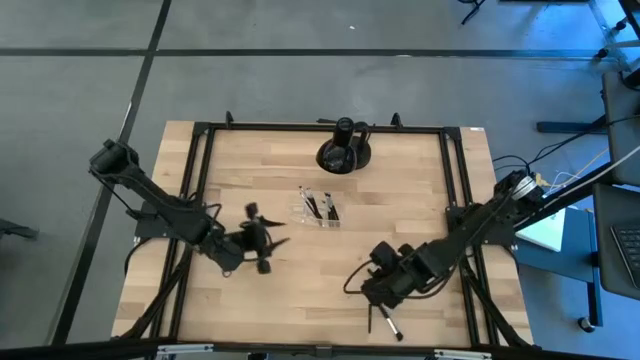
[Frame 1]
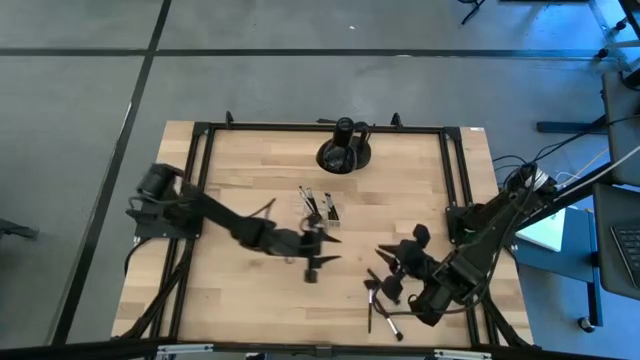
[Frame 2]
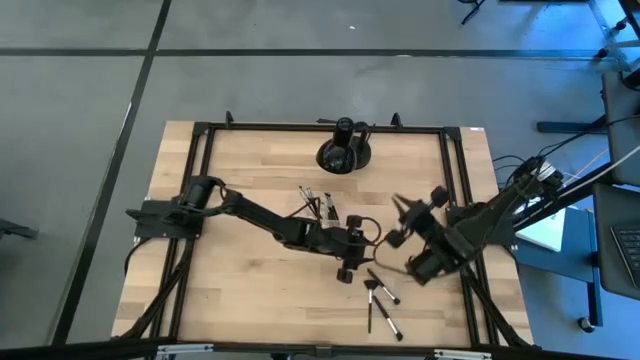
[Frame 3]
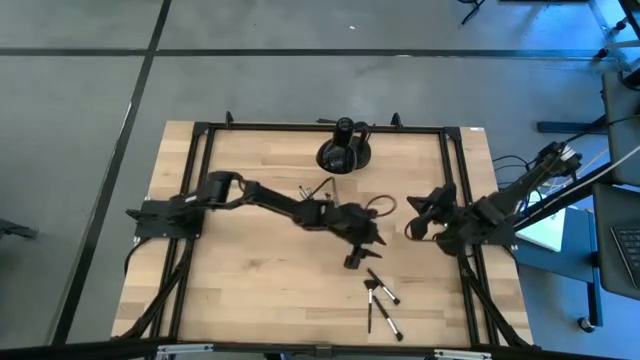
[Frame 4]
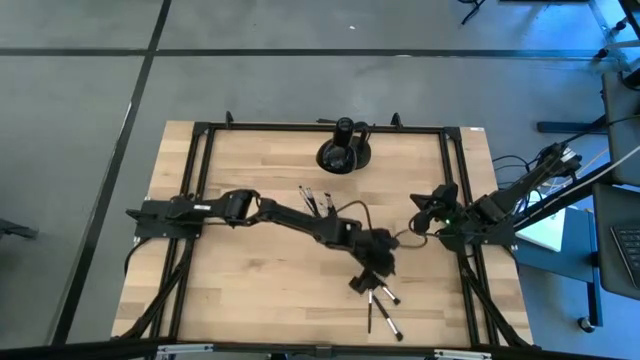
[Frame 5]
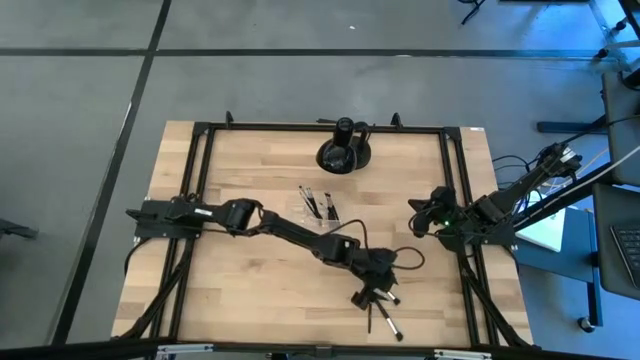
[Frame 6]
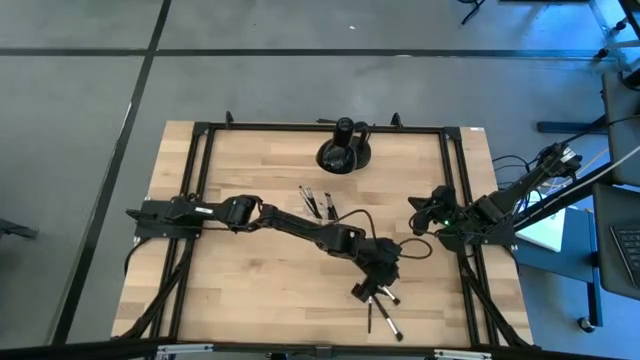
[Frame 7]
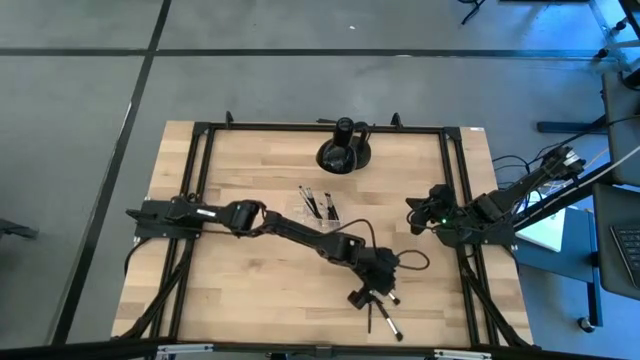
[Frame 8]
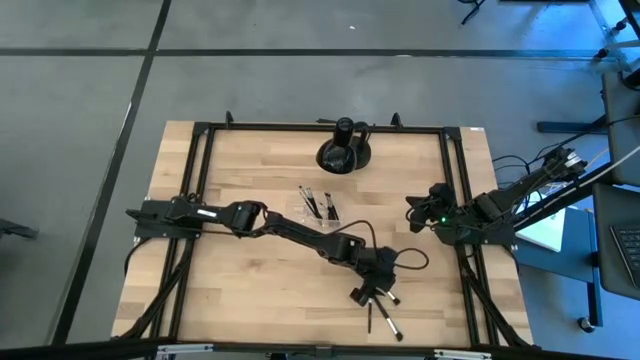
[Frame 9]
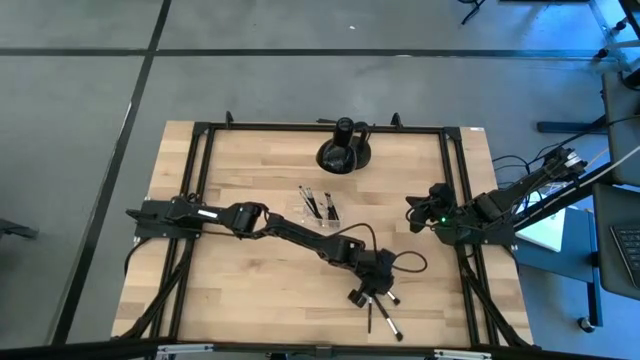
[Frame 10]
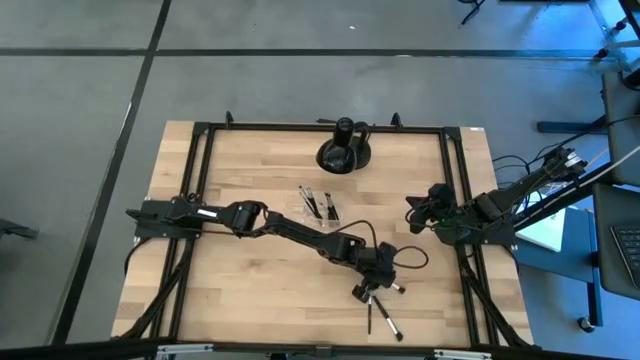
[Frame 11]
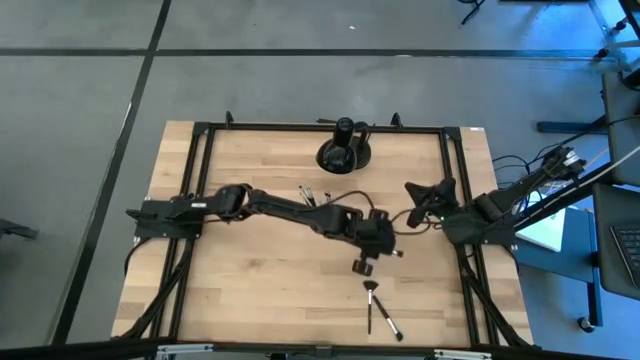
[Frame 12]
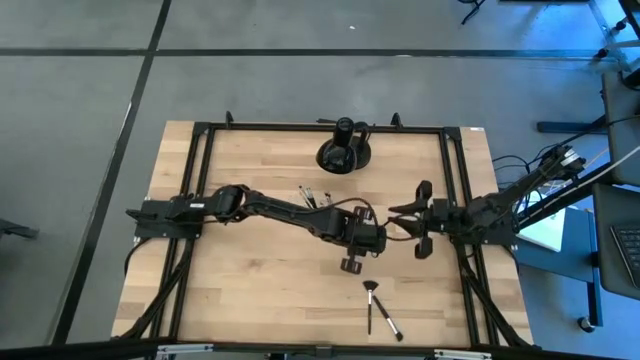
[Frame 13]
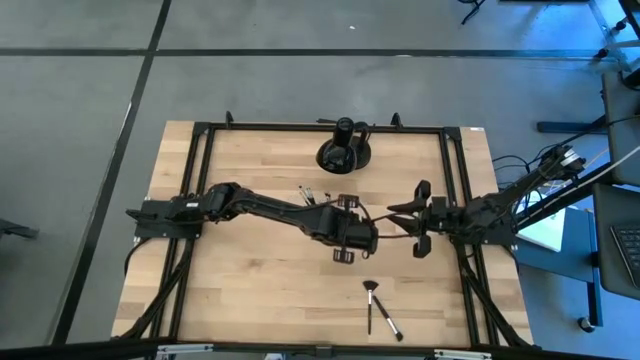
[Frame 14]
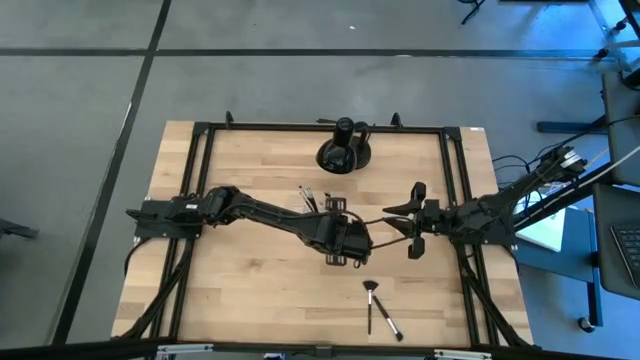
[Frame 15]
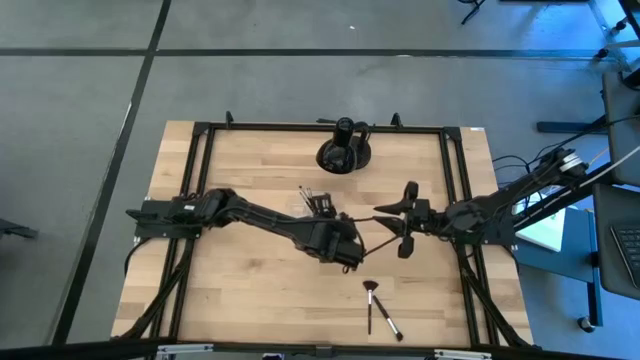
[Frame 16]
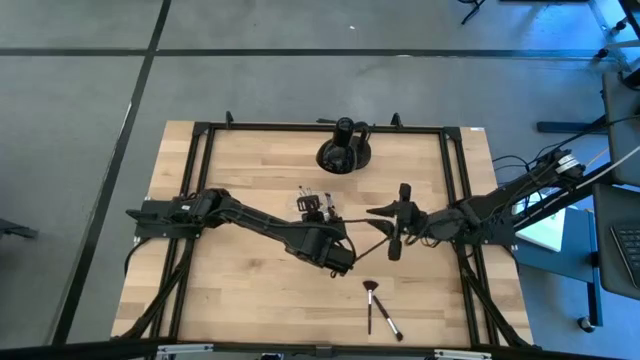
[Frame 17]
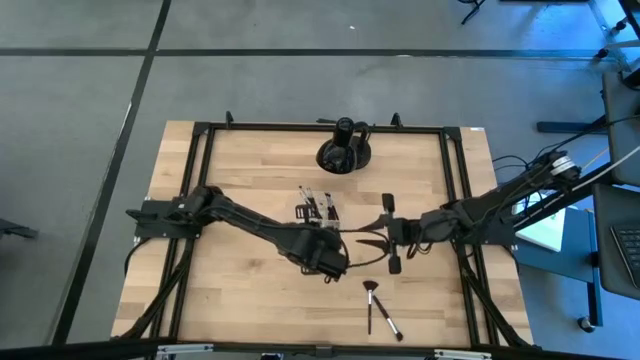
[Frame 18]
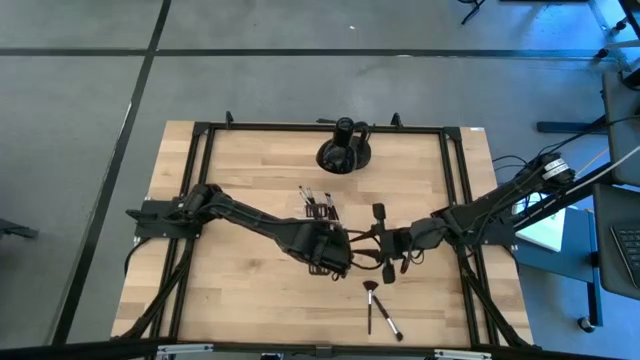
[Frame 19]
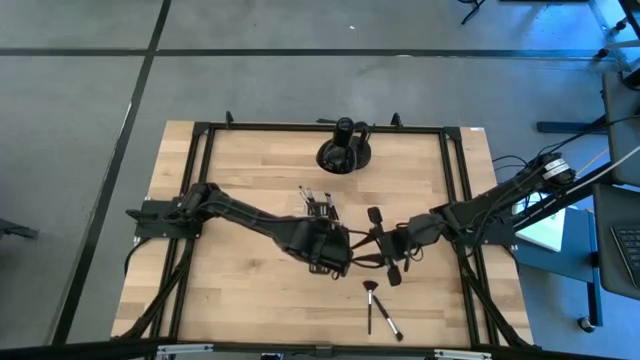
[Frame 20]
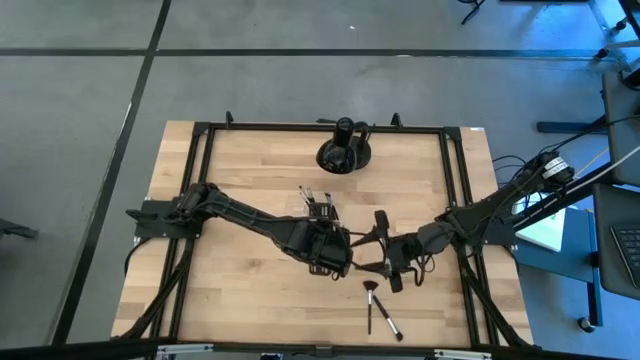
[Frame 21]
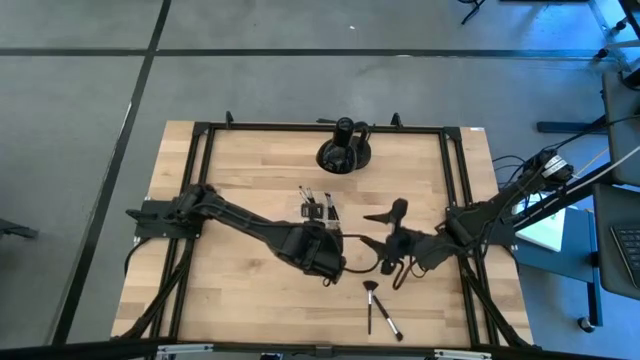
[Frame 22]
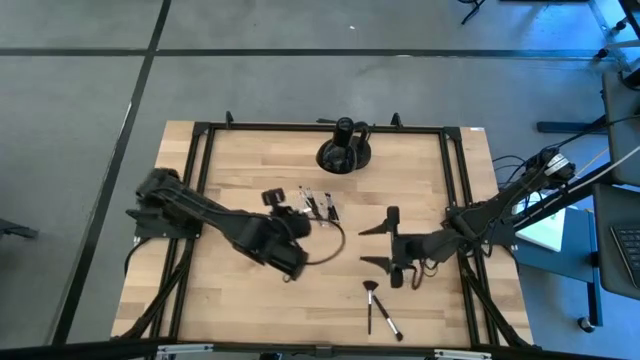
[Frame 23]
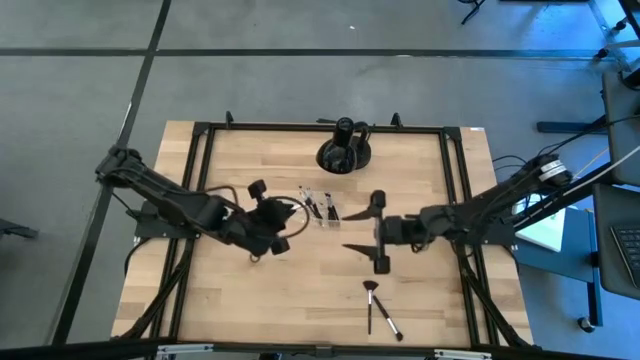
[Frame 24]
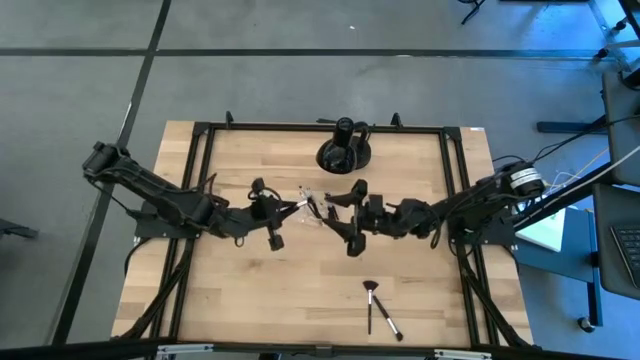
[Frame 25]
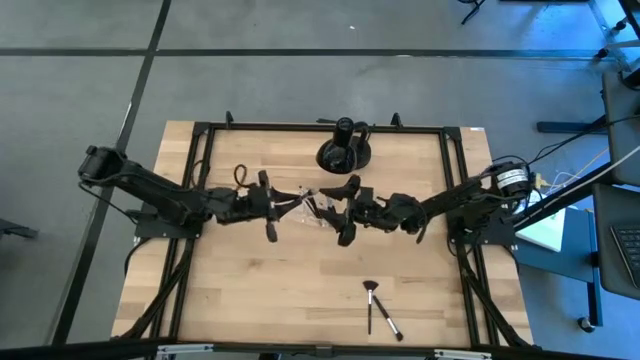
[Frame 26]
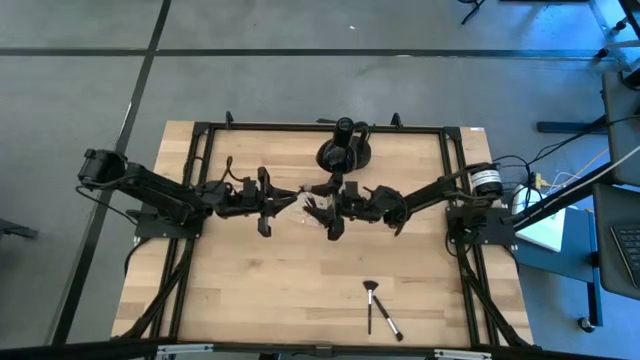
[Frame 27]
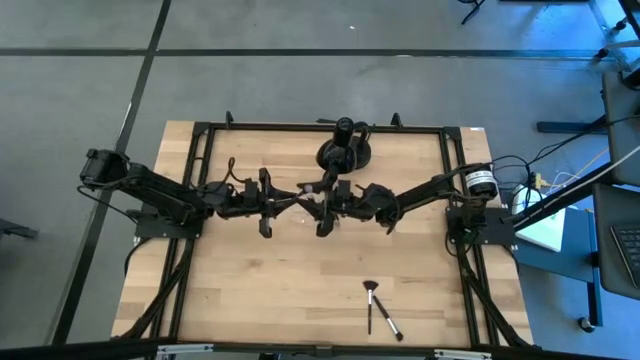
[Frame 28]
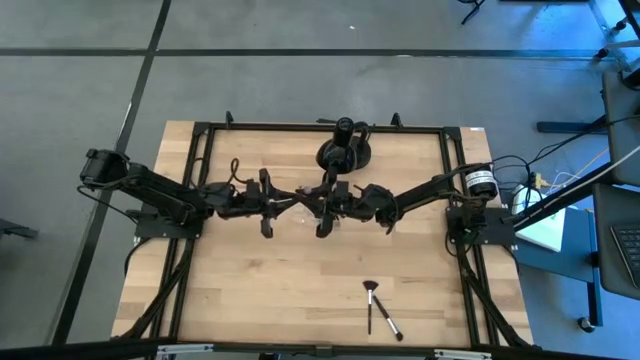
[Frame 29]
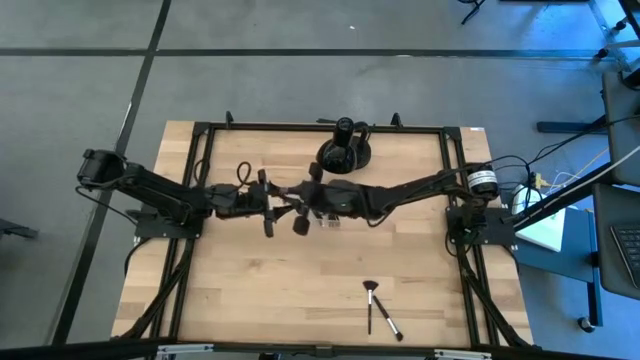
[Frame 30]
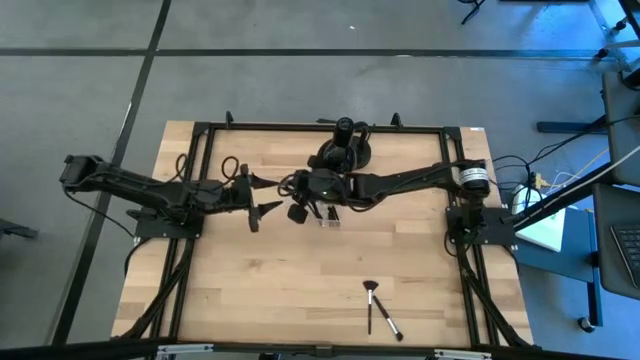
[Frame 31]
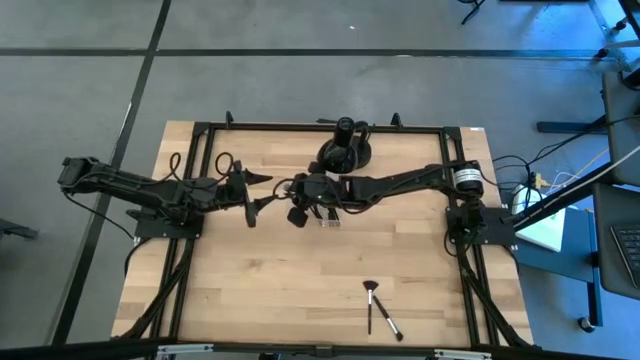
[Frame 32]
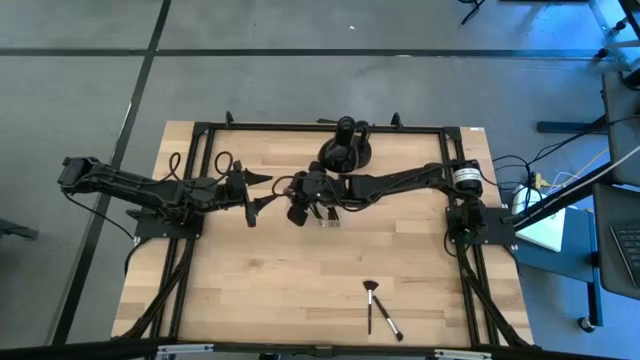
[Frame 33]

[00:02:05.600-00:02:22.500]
Task: Pick & Place Makeup Supplies
Put the makeup brush into the transparent organizer

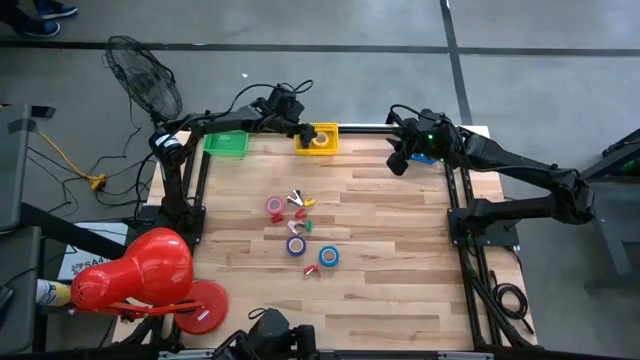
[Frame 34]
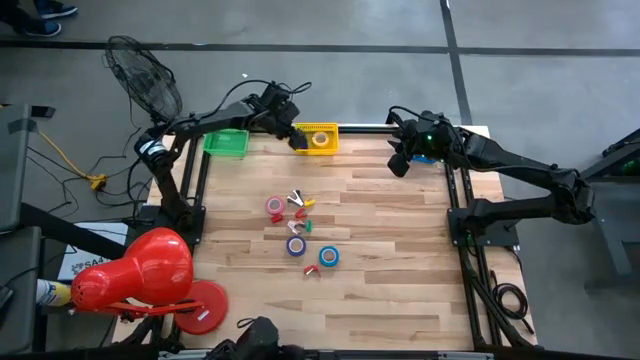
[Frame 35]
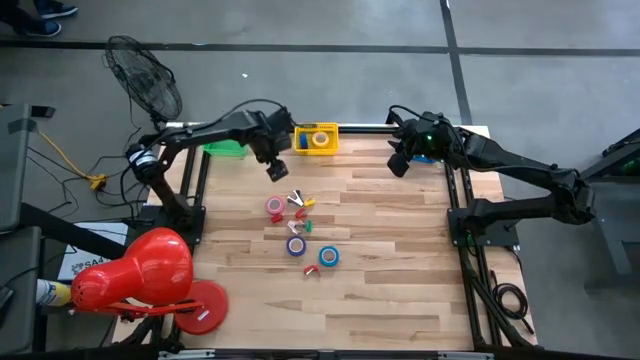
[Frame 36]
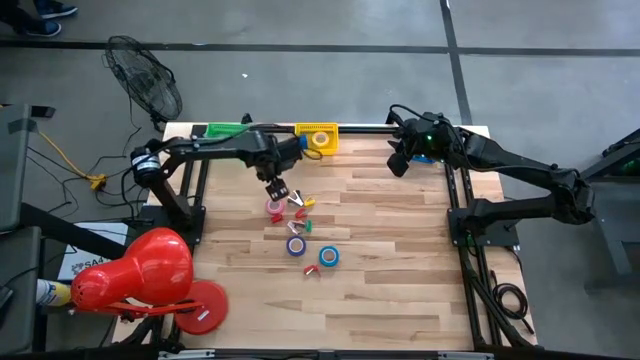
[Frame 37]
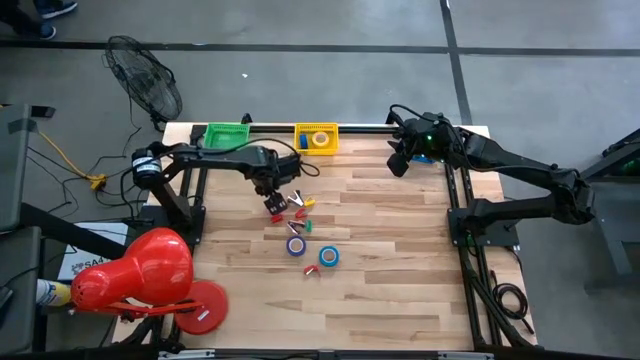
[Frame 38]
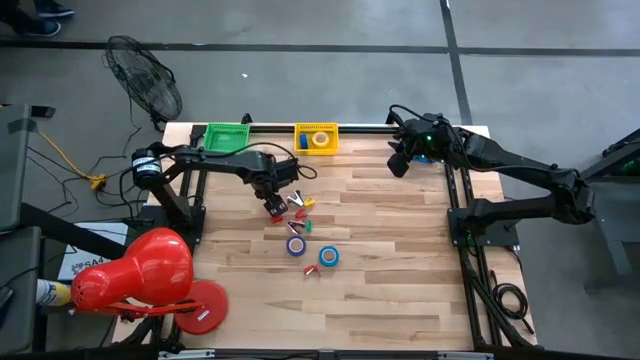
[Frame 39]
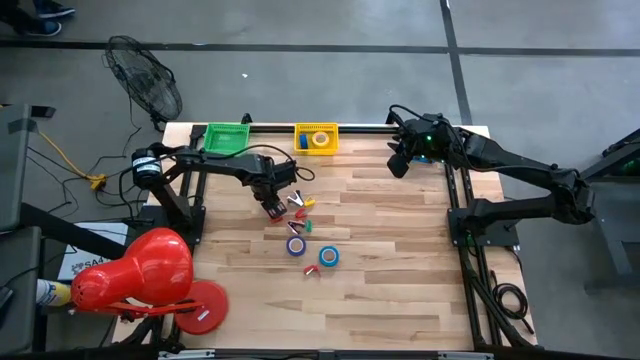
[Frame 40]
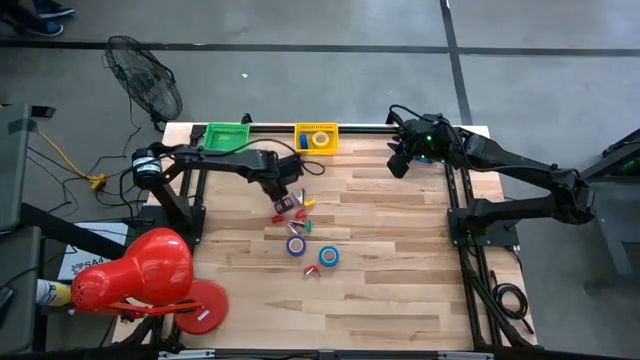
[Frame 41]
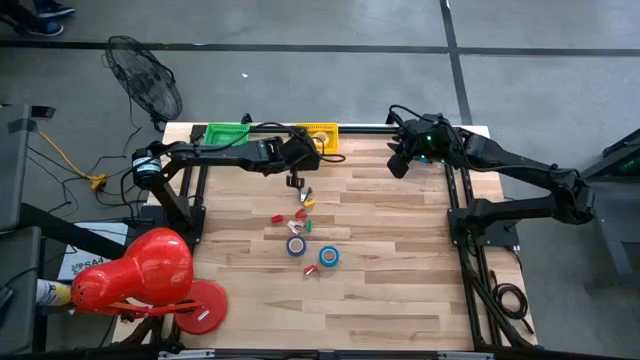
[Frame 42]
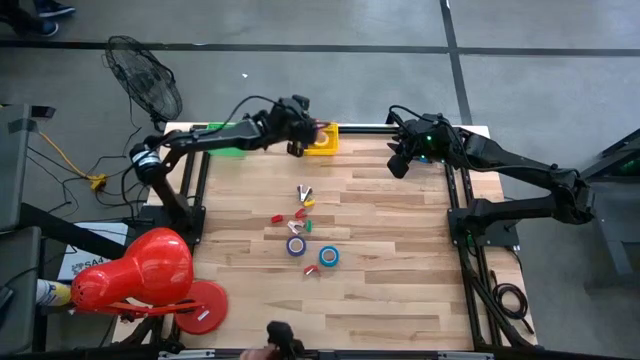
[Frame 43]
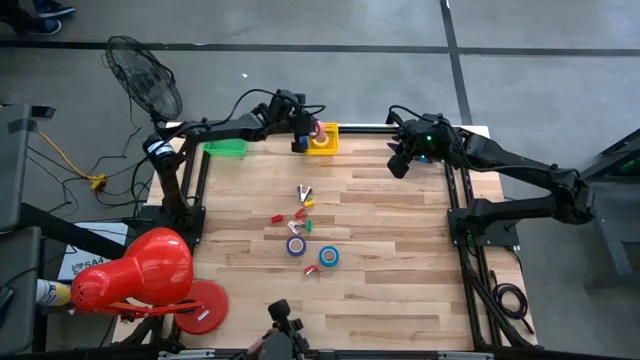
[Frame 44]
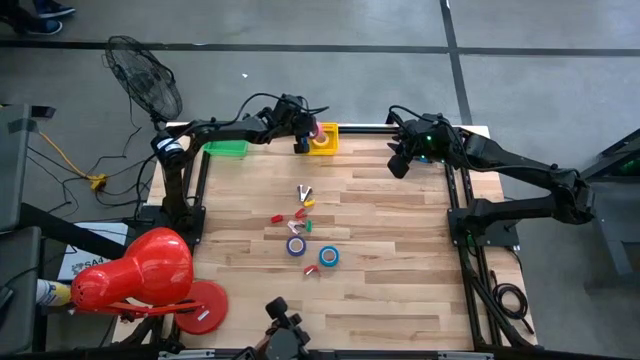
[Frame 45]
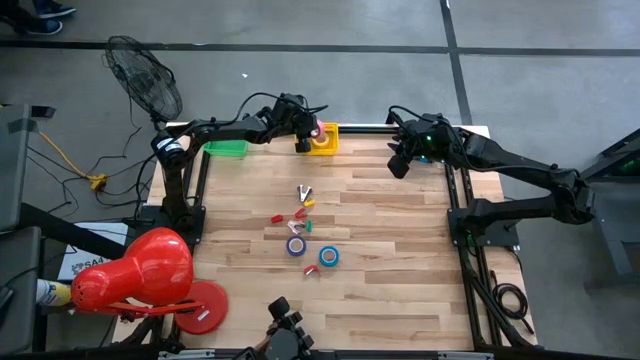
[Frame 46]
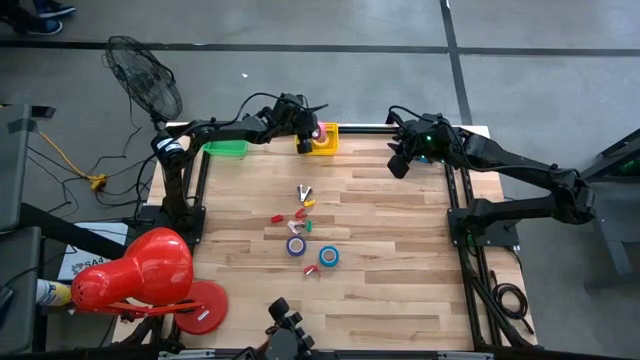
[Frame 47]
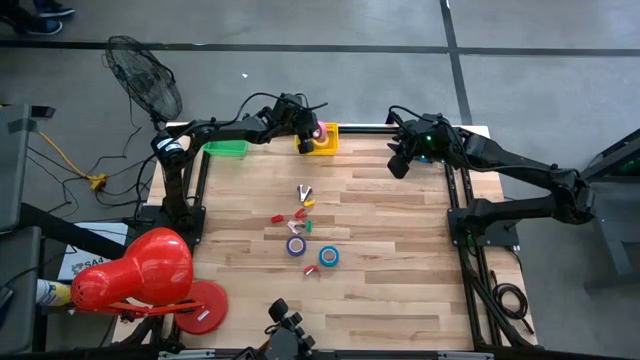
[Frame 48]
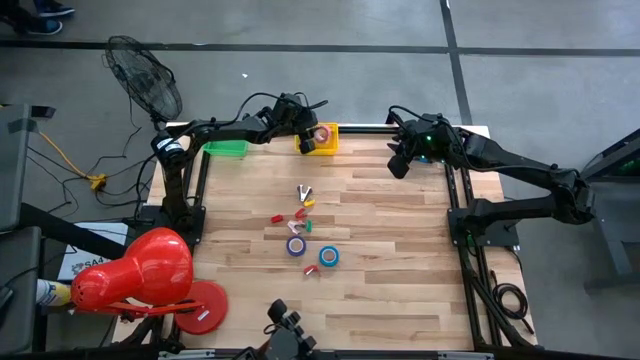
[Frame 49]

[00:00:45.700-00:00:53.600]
Task: Pick and place Stapler, Stapler remover, tape
Put the pink tape into the yellow bin
